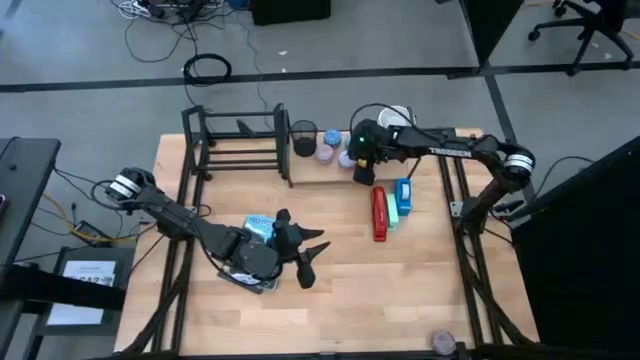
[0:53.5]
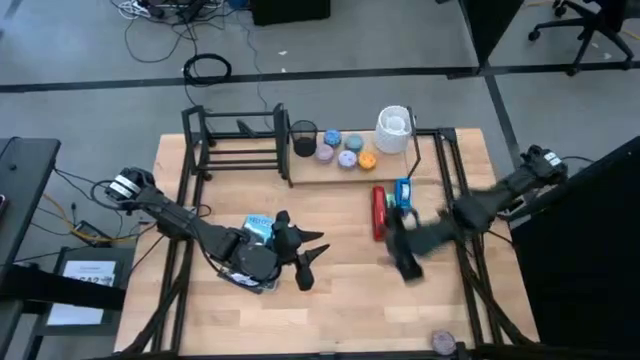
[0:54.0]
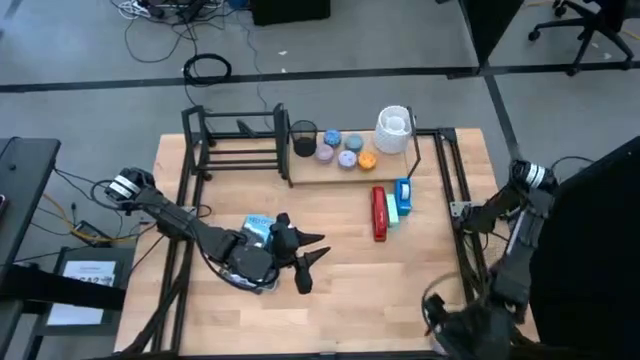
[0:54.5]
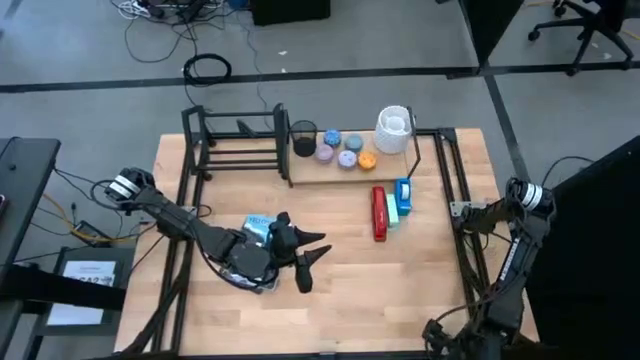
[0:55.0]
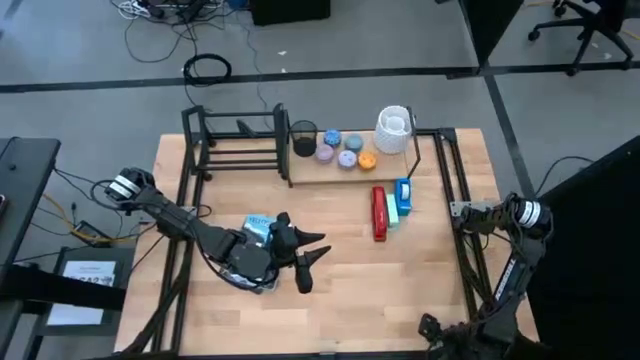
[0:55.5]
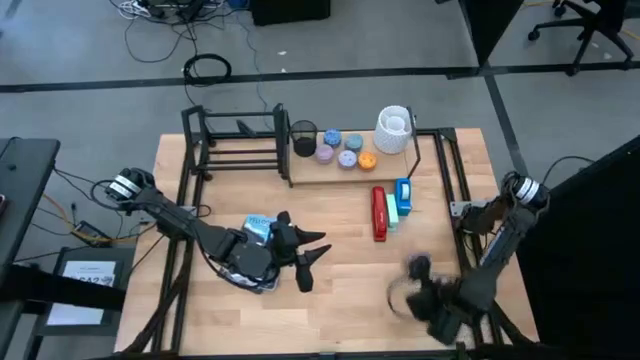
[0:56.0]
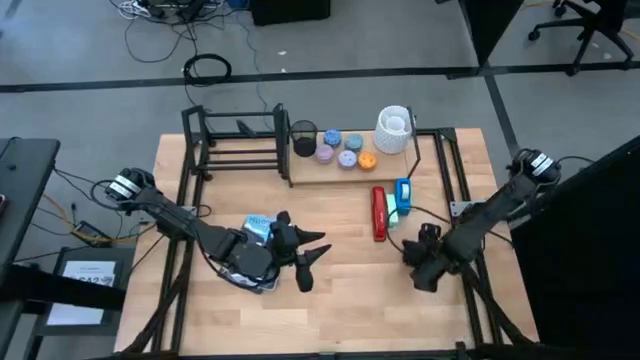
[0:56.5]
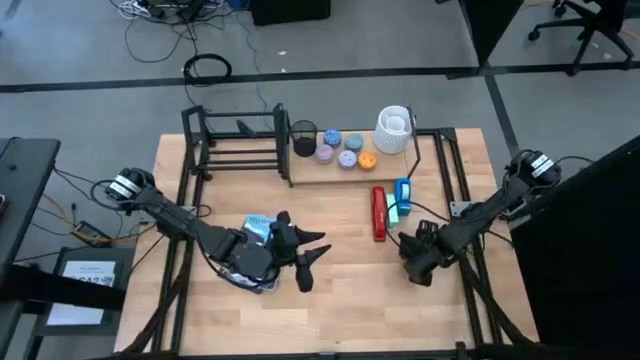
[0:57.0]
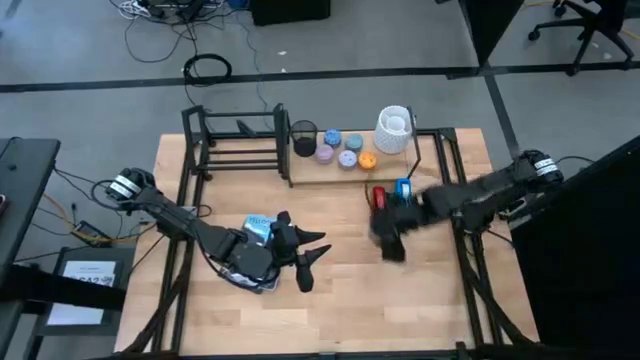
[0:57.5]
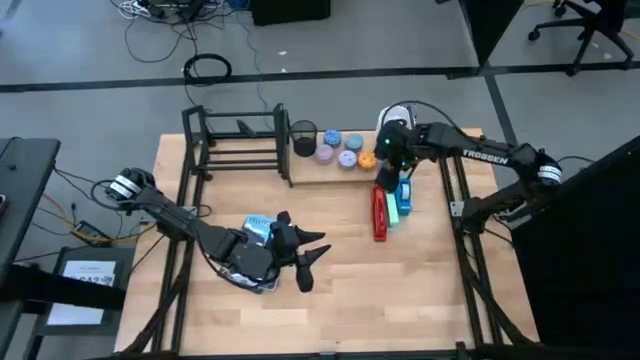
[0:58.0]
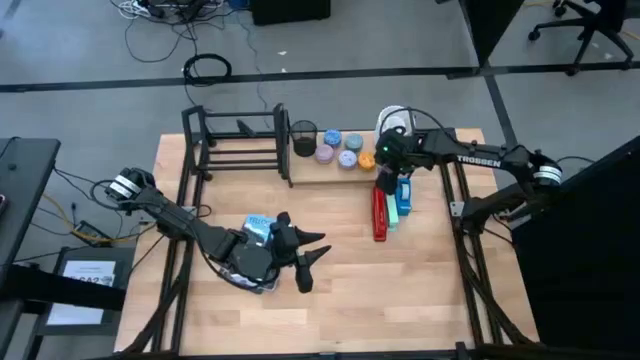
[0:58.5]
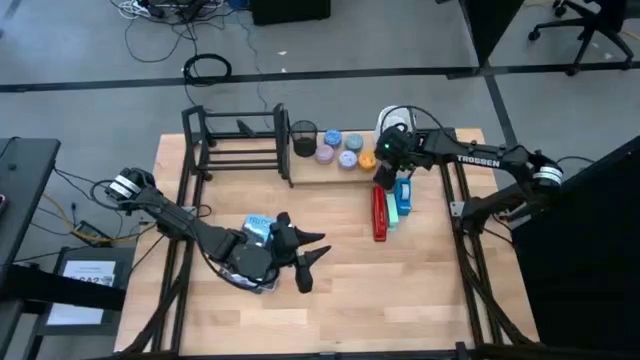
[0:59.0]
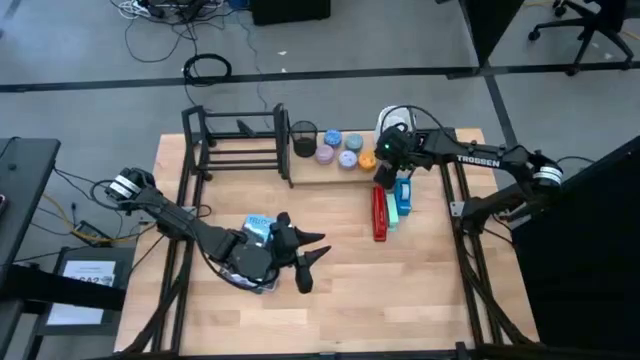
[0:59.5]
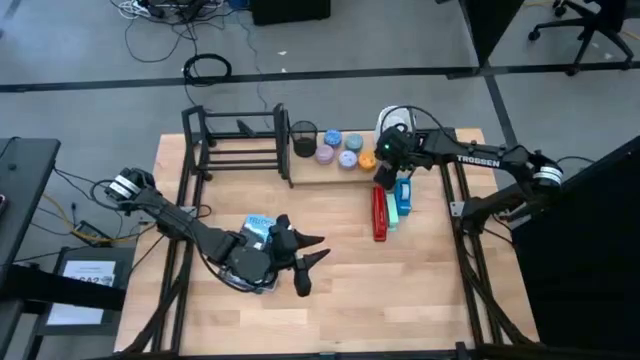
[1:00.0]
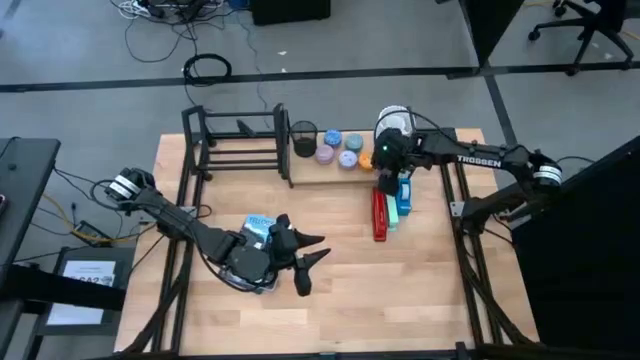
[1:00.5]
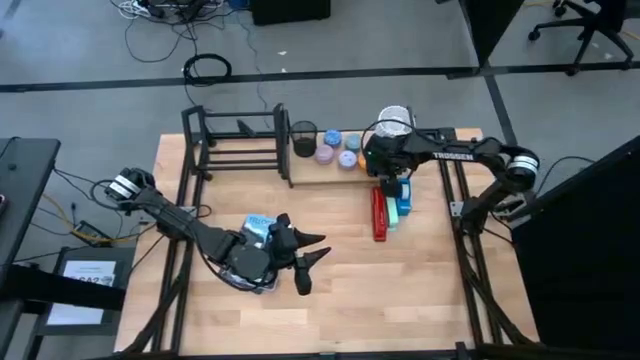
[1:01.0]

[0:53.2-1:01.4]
Task: Stock shelves
Put the dark red scented candle on the shelf

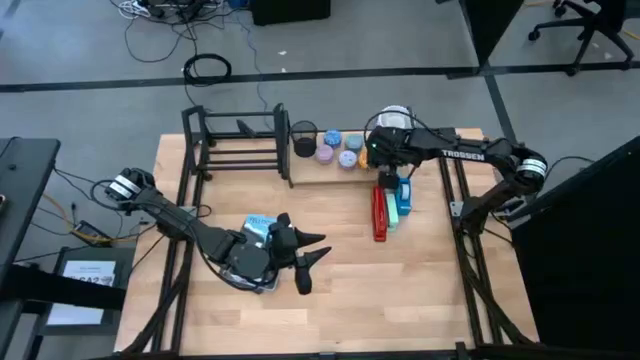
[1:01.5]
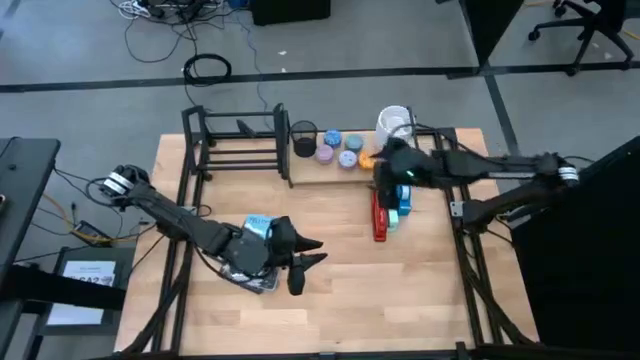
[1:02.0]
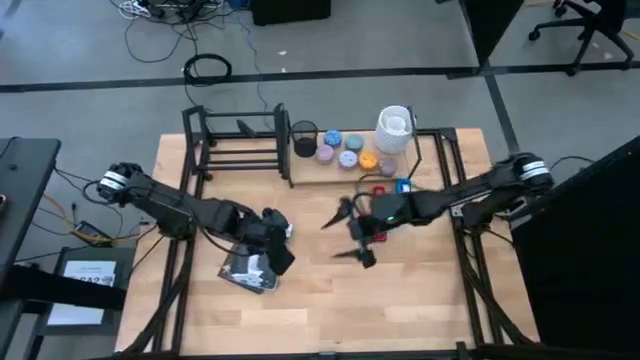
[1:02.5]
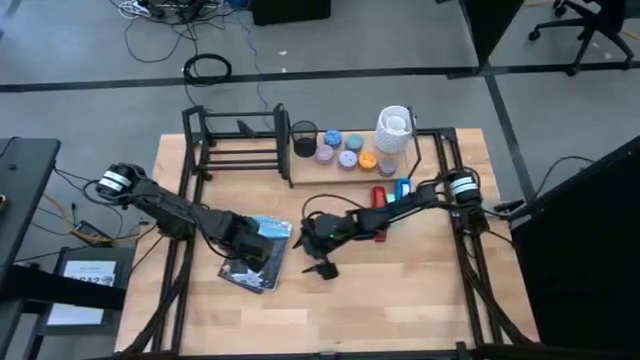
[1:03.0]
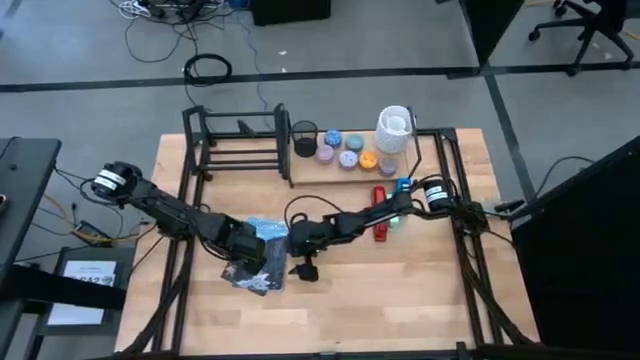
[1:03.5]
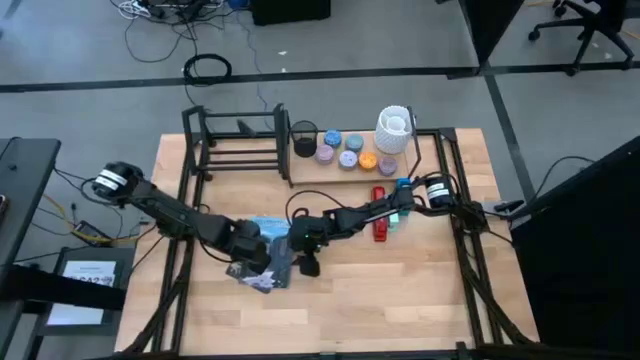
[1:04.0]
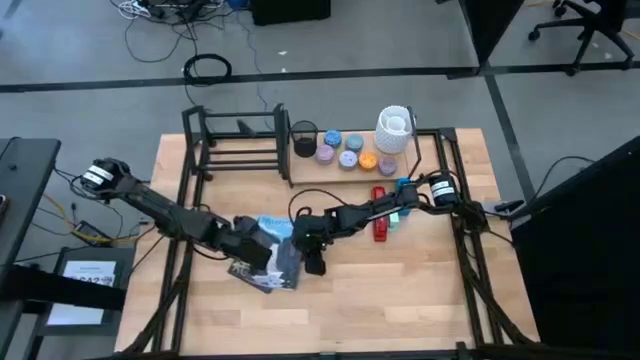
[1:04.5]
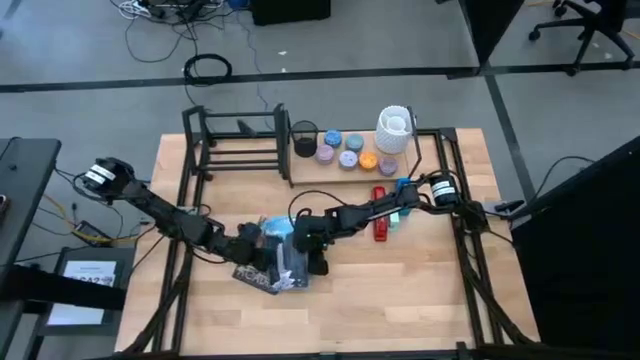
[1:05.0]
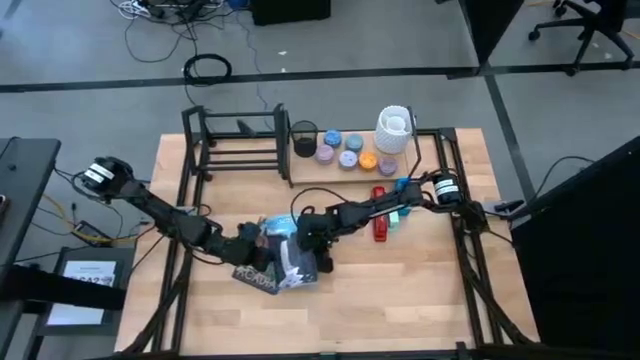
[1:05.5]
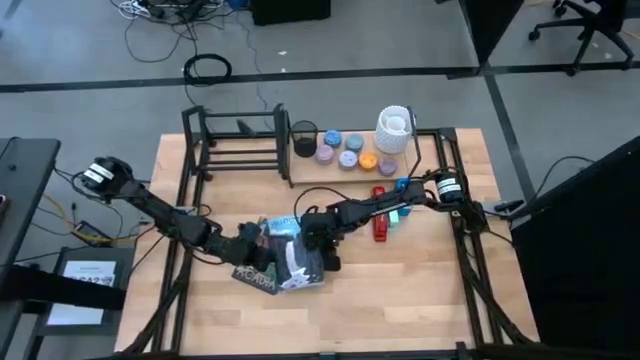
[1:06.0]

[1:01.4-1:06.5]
Put the blue book on the bookshelf

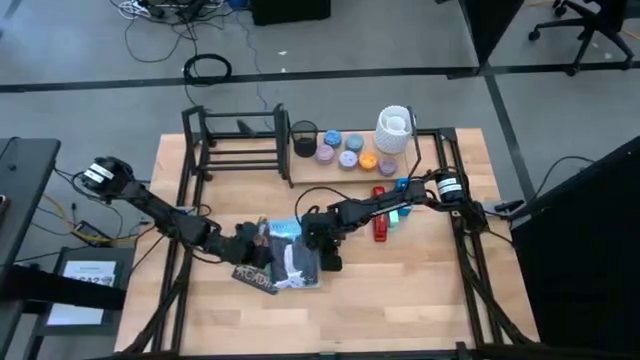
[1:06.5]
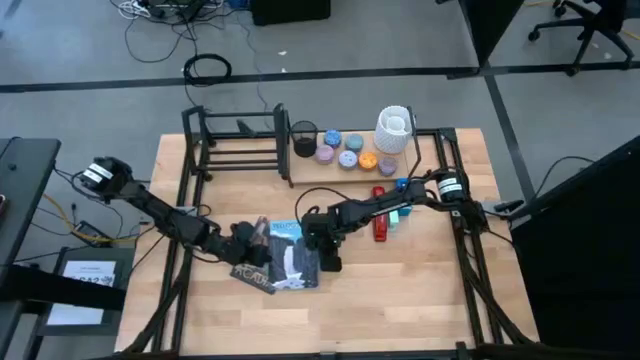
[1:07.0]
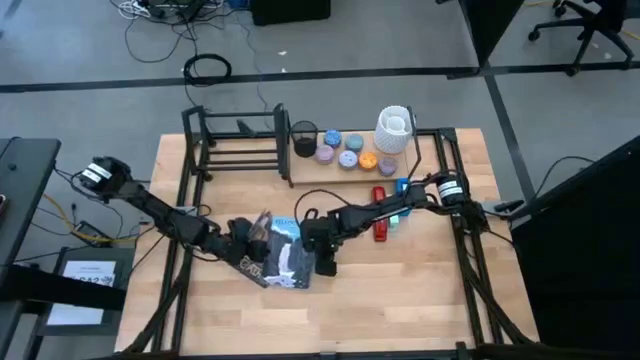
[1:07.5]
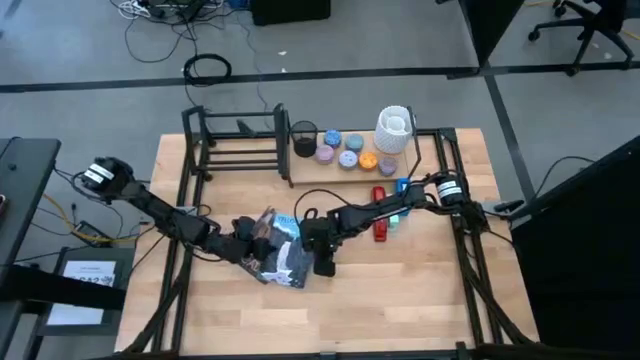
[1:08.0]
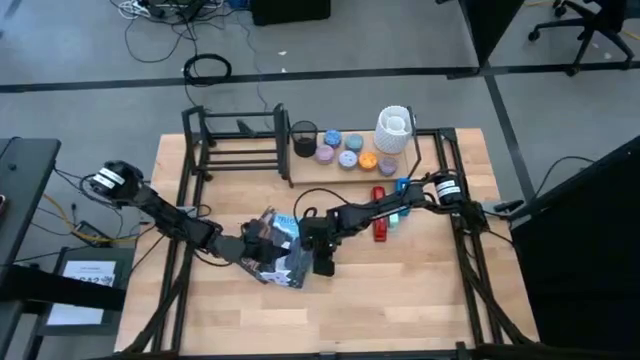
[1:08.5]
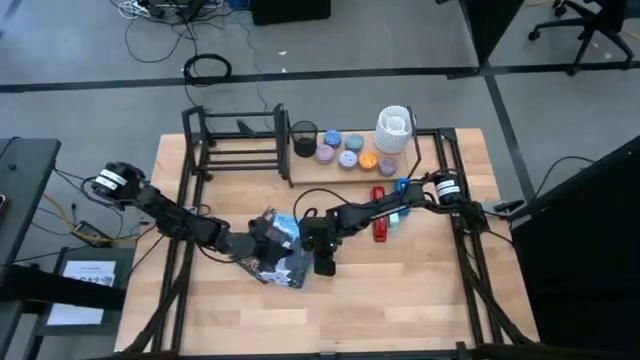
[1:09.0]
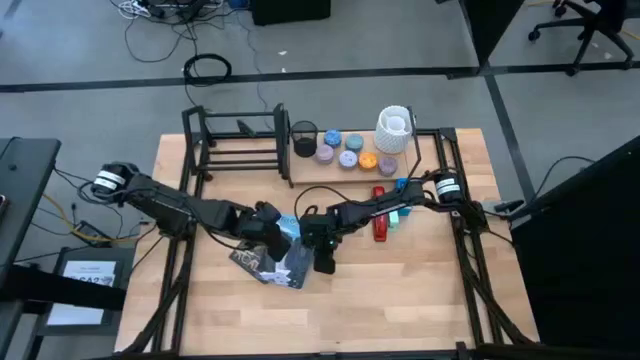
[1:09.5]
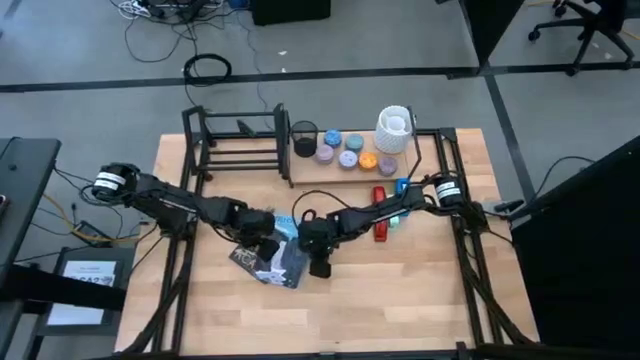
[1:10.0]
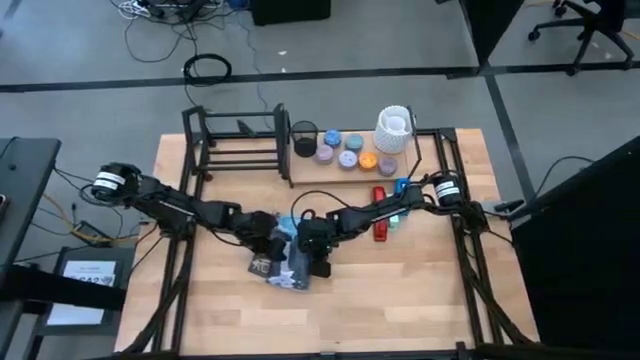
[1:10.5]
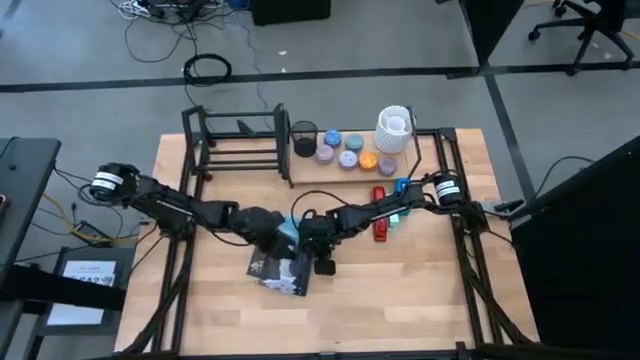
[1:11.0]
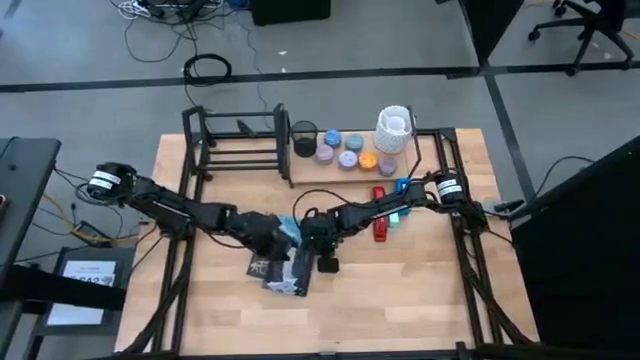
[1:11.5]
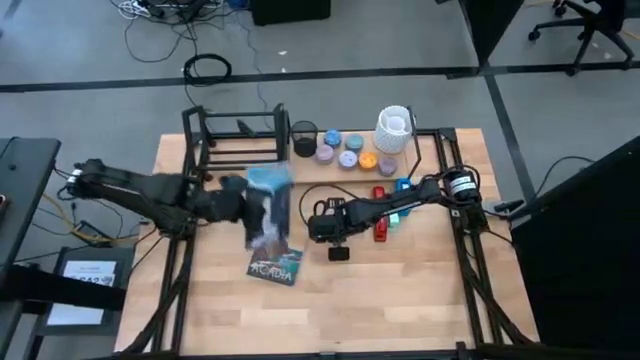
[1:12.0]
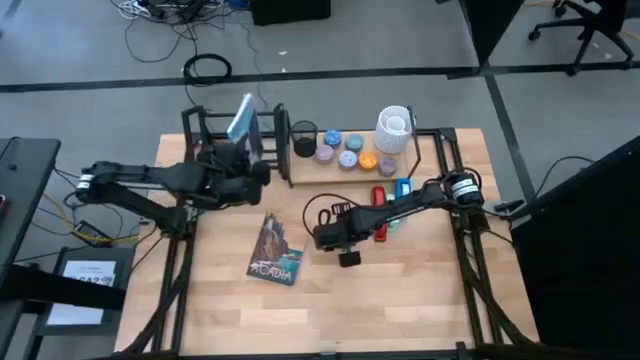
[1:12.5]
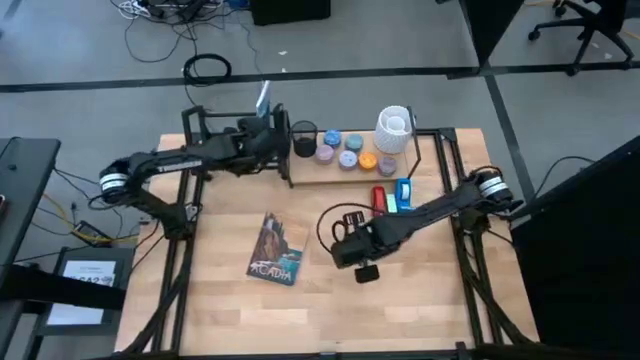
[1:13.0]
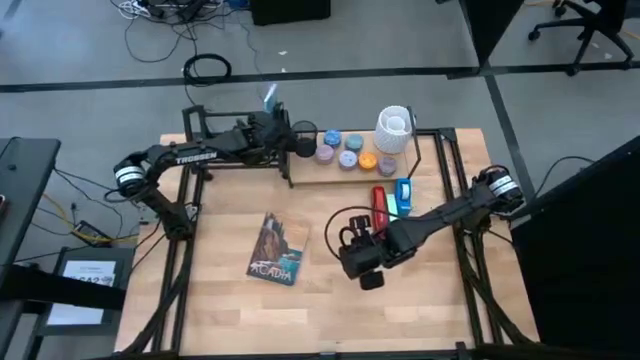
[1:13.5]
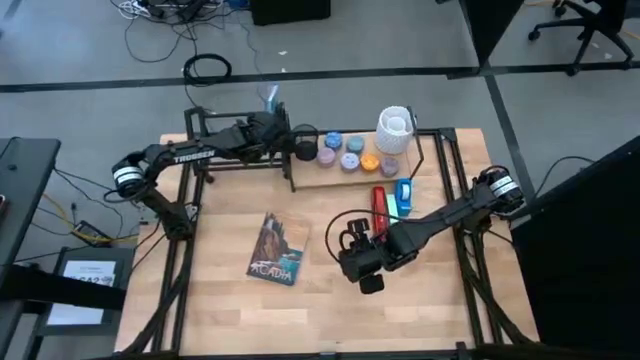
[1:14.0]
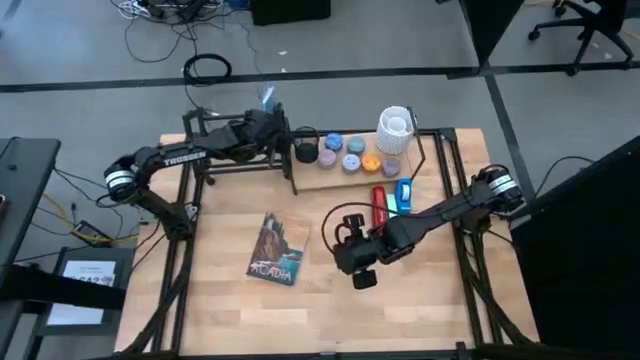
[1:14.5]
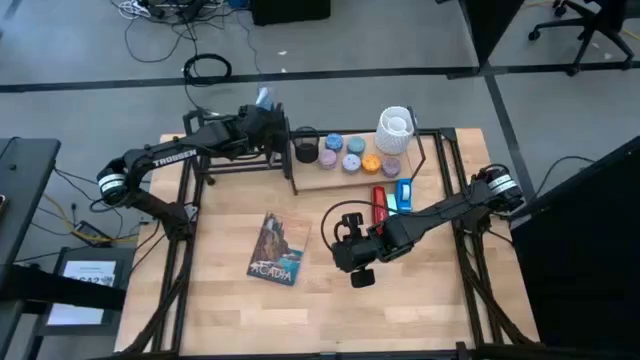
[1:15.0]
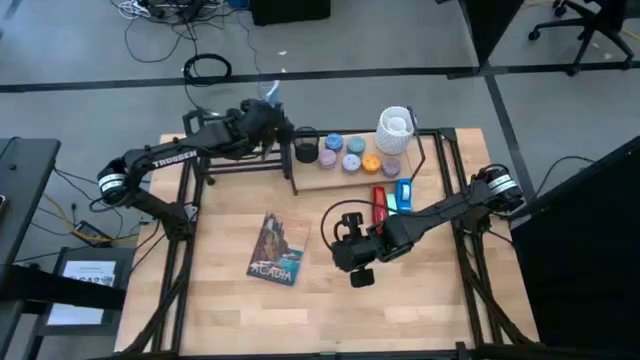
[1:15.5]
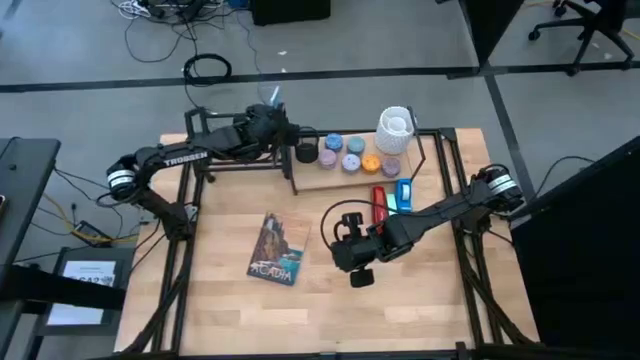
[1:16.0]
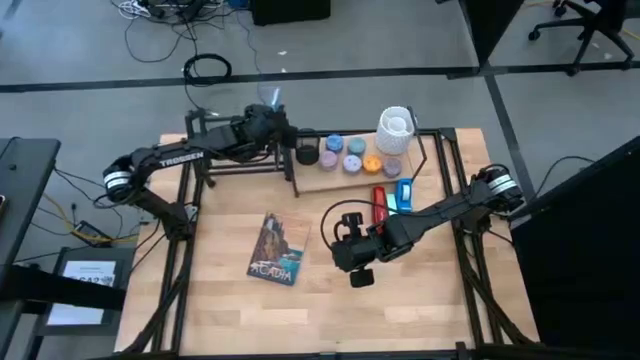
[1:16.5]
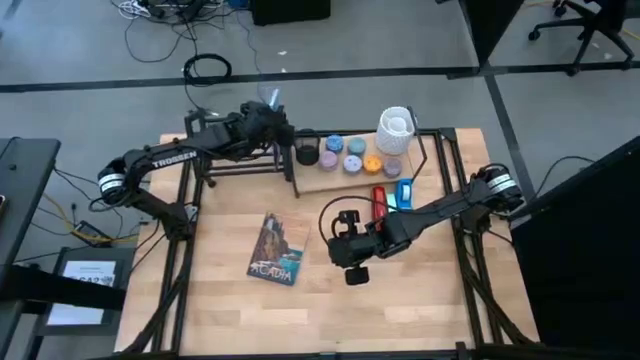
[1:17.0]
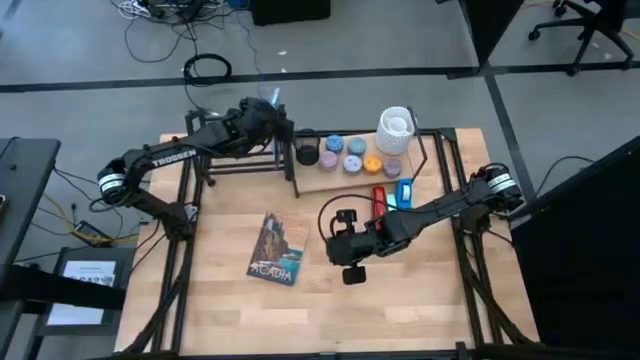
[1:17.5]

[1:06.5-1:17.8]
Put the blue book on the bookshelf
